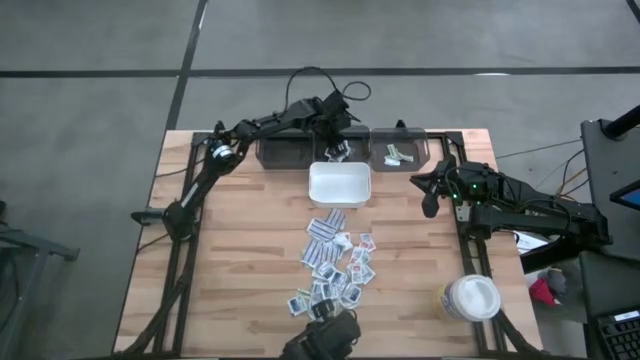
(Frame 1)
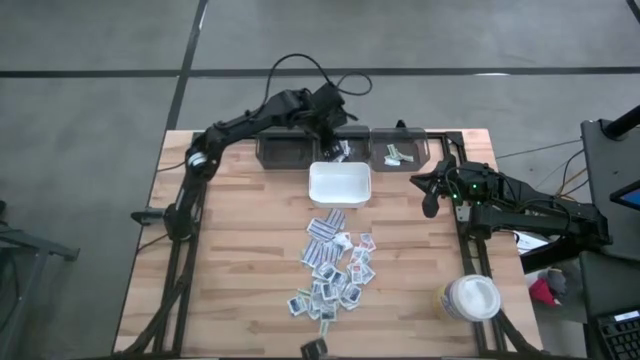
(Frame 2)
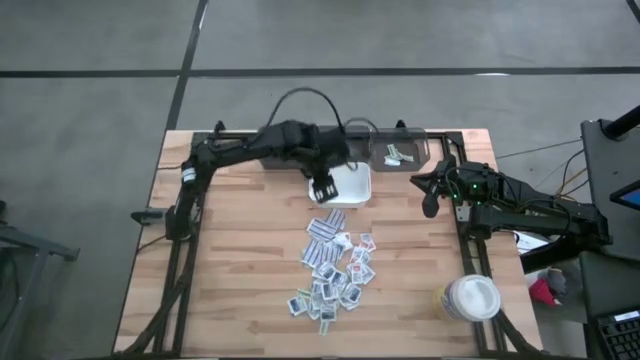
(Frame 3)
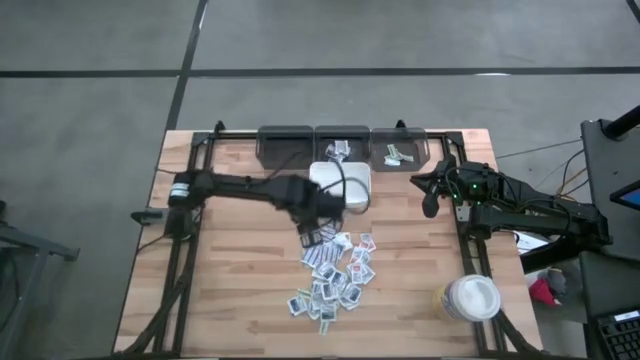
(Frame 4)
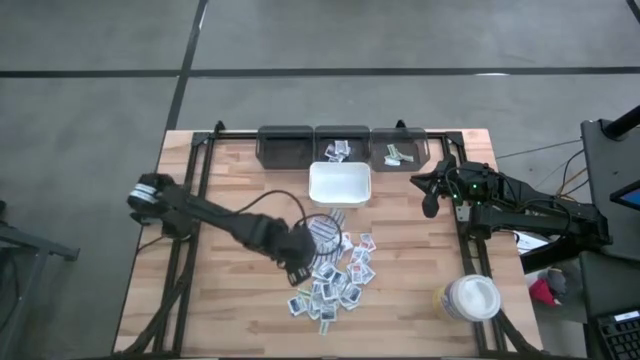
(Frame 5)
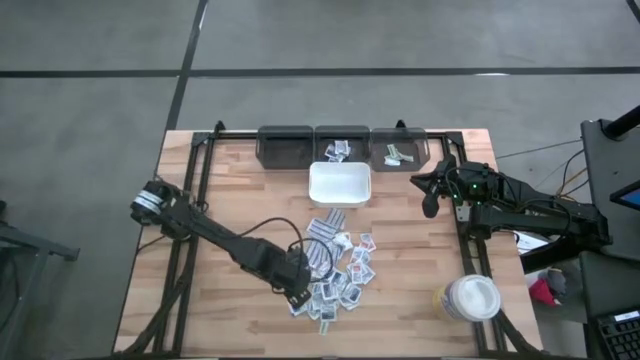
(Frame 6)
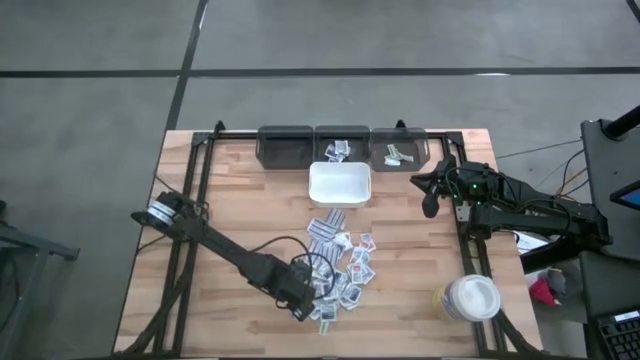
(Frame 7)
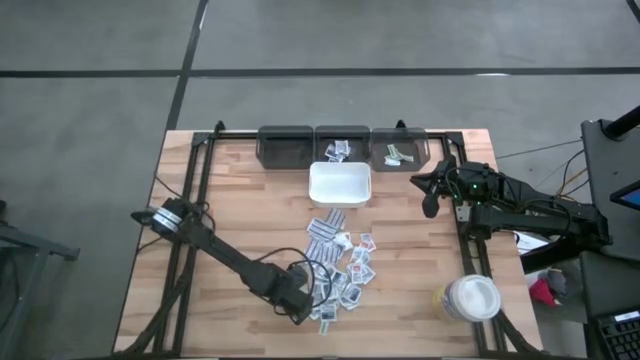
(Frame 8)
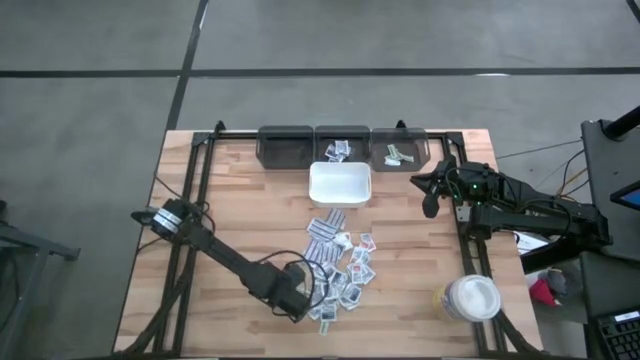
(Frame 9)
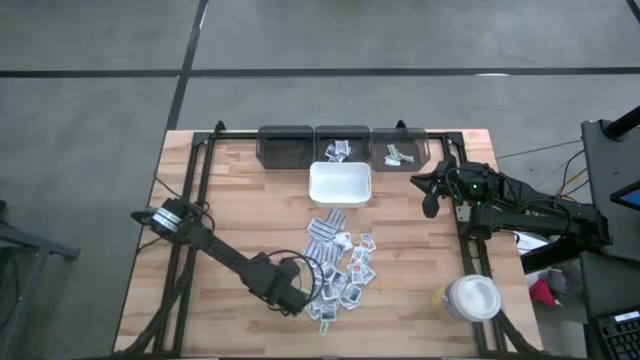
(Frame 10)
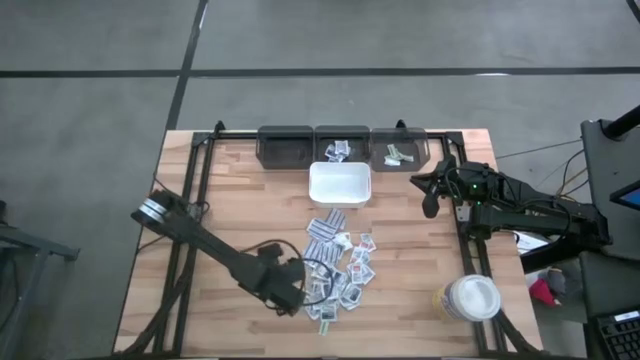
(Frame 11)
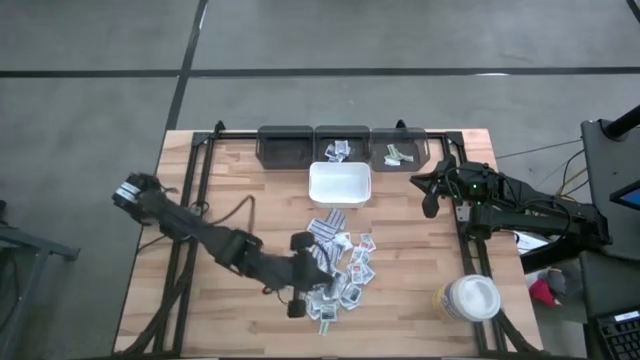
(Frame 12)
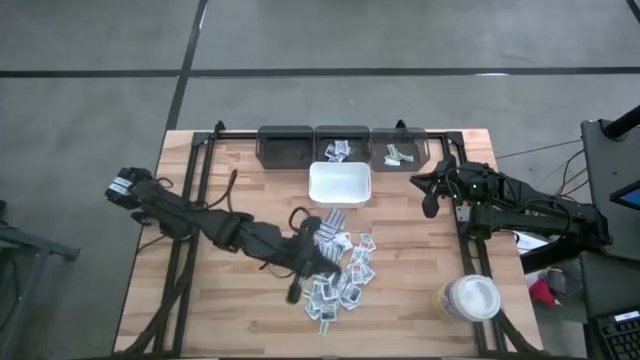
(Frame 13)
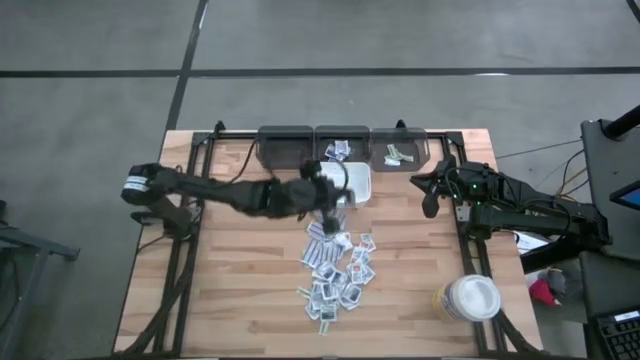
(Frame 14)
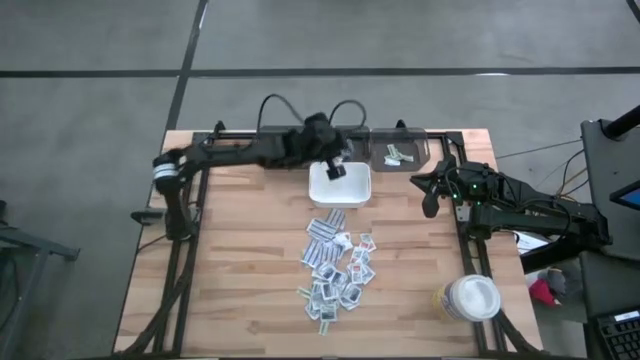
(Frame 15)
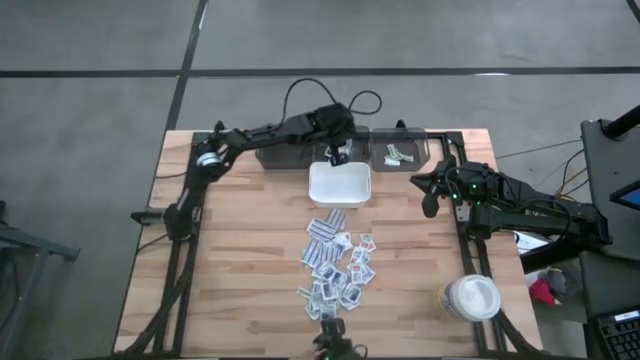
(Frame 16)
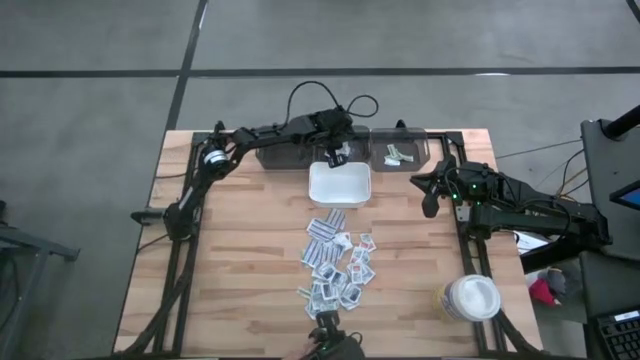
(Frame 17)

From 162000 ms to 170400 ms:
Task: Pick & Place First Aid Supplies
Put the blue alcohol pad into the middle gray bin

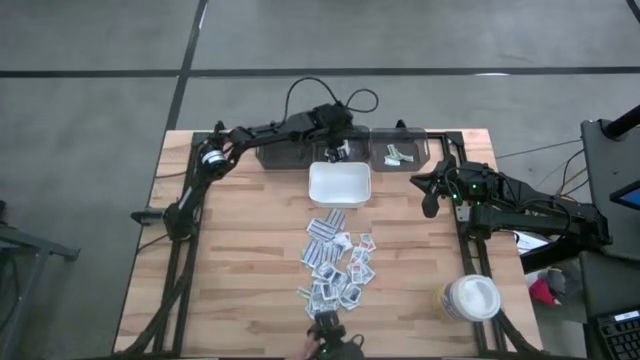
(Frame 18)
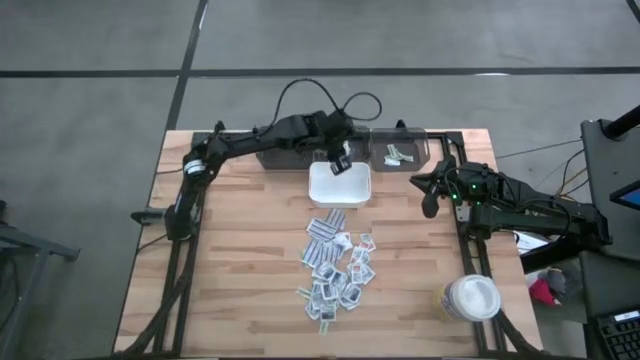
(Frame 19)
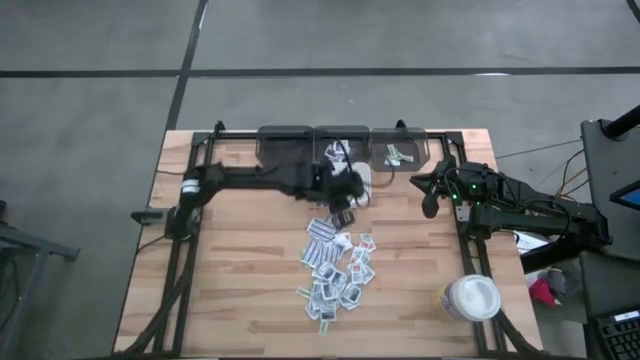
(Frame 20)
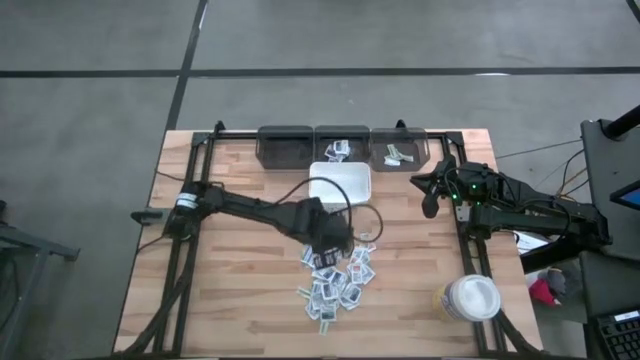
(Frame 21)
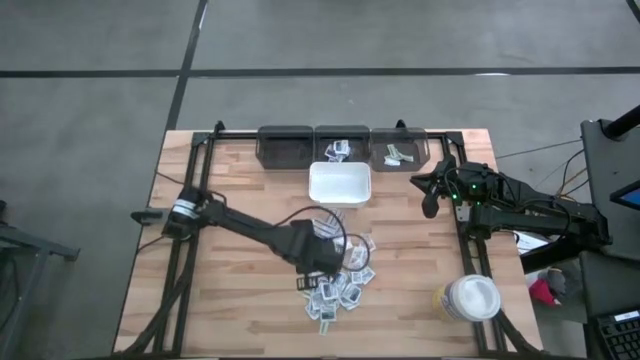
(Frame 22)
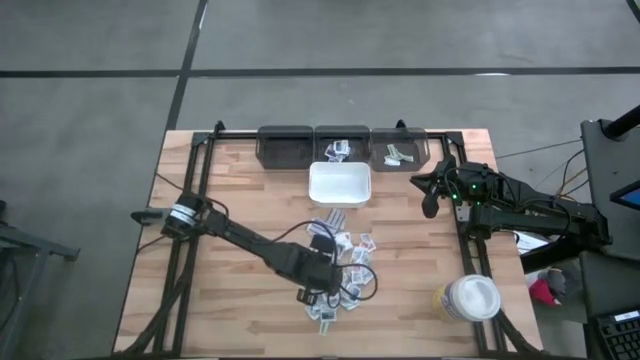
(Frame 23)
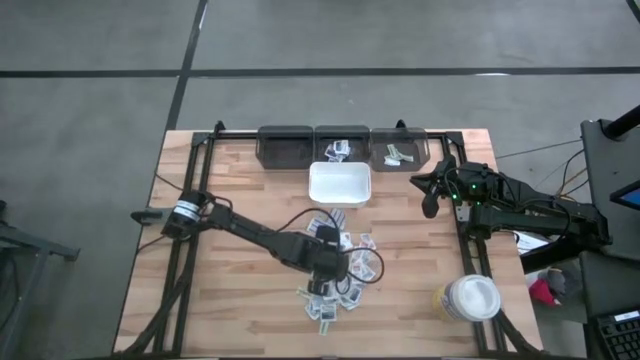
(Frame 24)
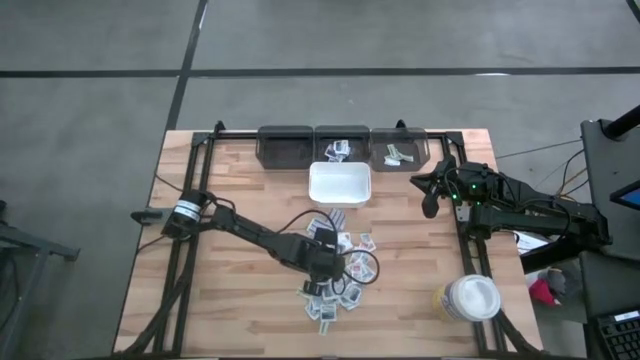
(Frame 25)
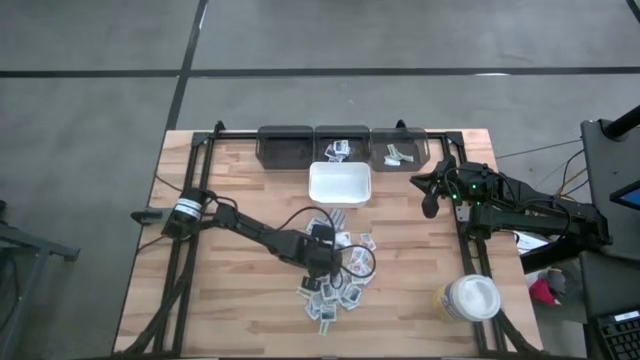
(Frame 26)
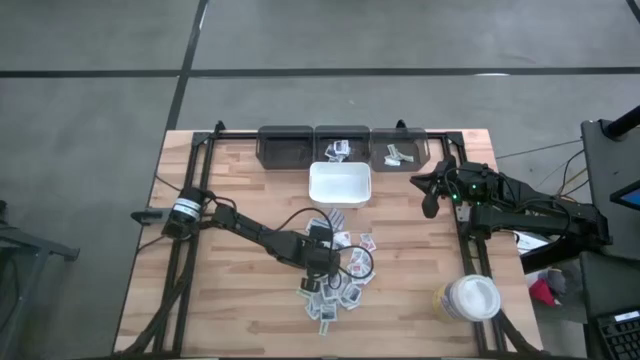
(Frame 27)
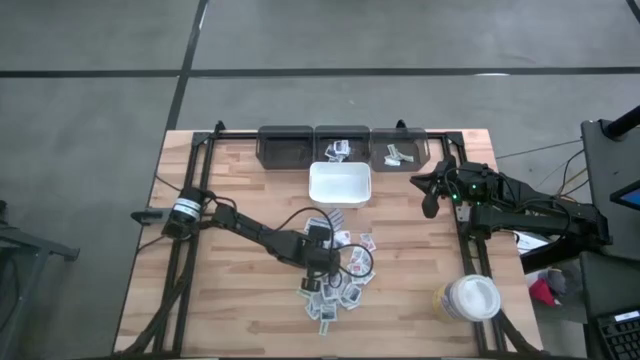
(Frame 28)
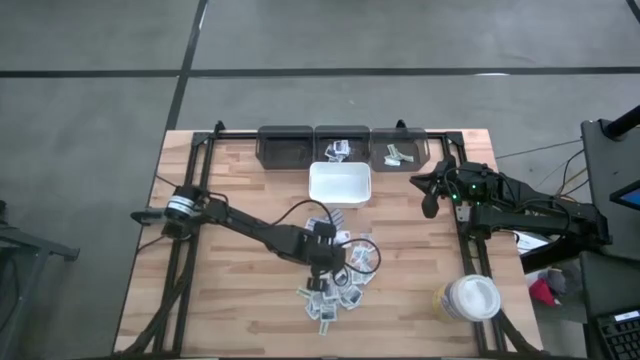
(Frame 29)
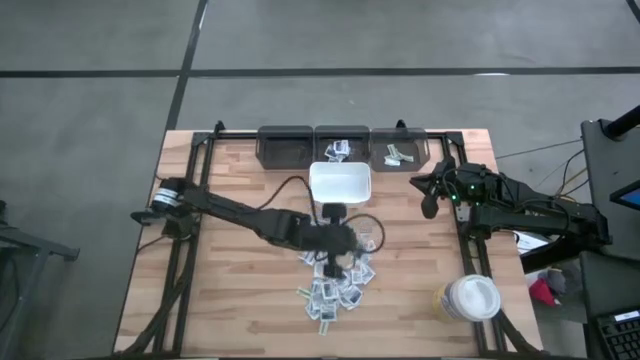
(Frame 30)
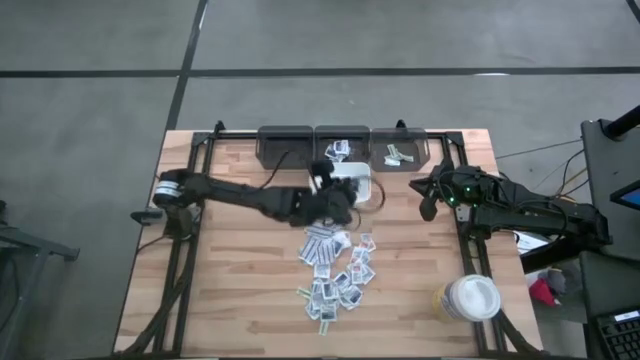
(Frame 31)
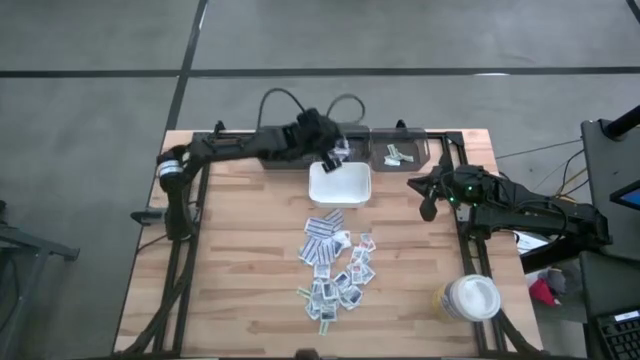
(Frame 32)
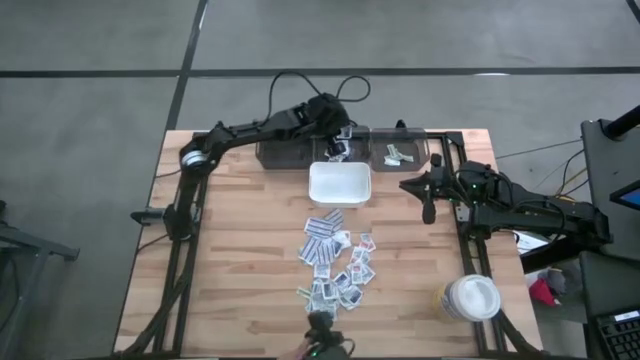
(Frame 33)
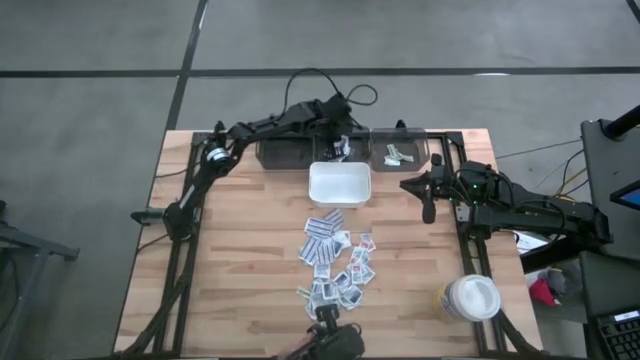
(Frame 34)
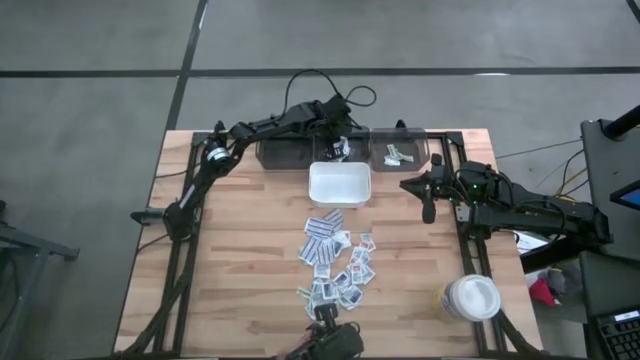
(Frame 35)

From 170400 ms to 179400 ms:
Put the blue alcohol pad into the middle gray bin

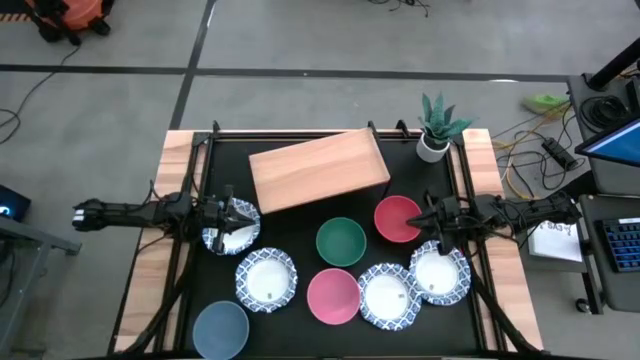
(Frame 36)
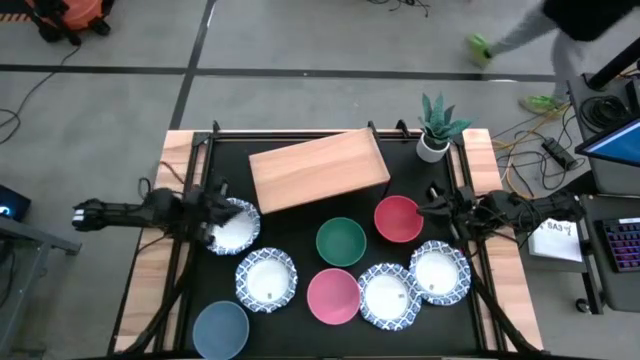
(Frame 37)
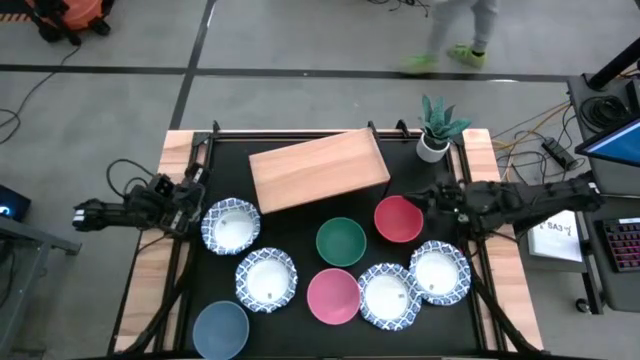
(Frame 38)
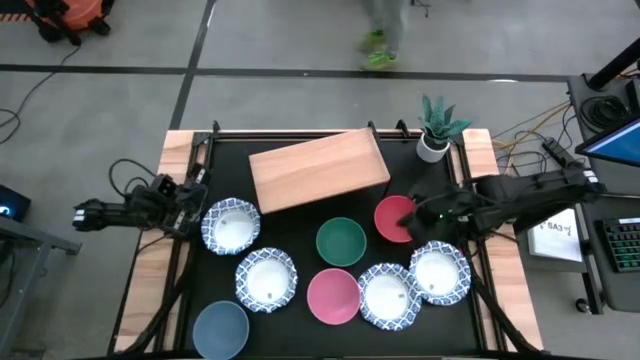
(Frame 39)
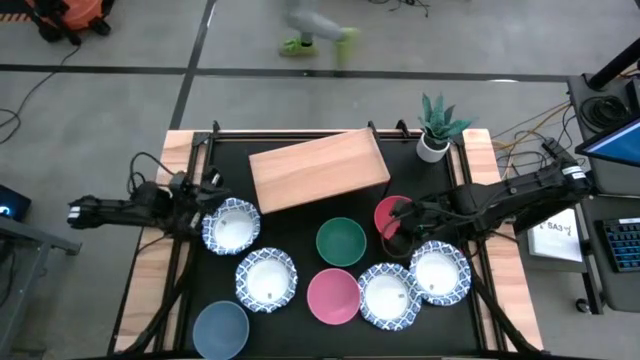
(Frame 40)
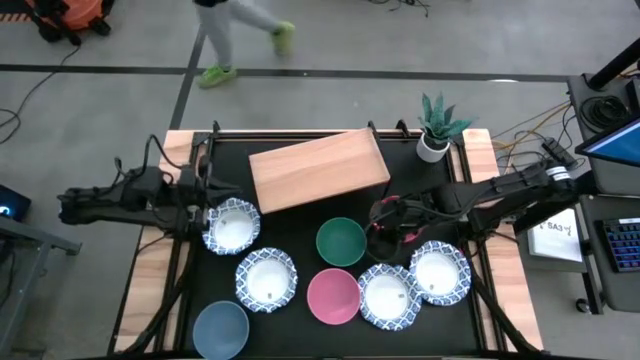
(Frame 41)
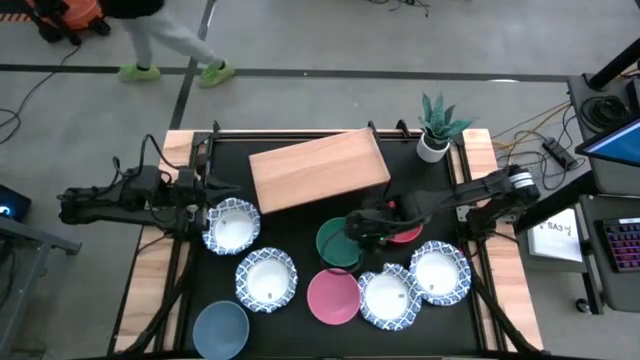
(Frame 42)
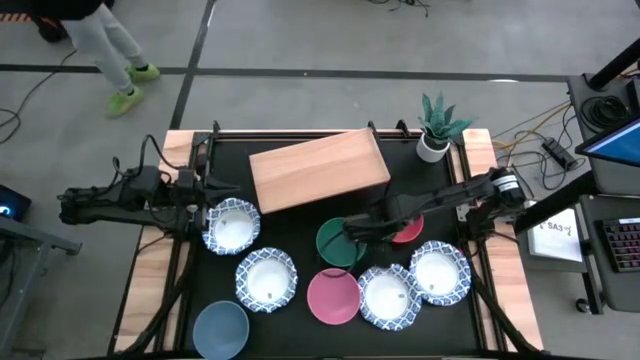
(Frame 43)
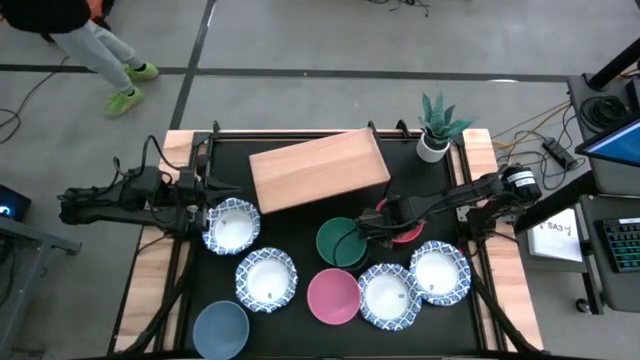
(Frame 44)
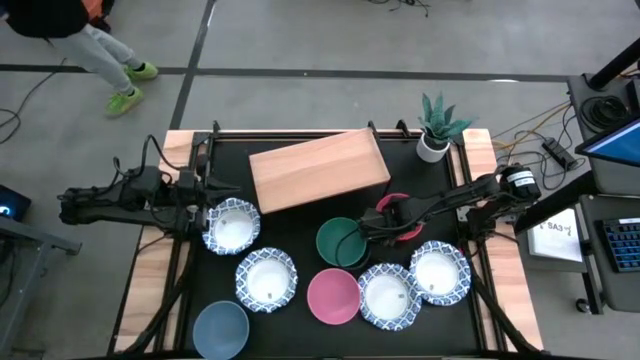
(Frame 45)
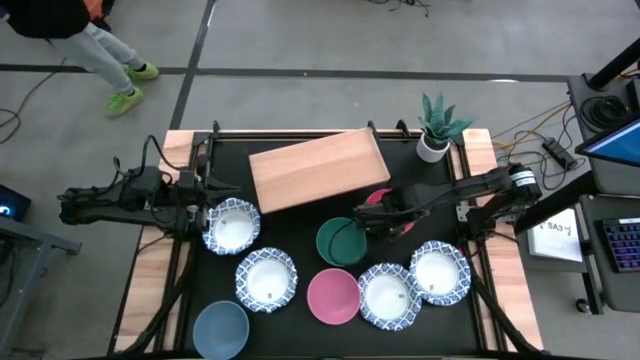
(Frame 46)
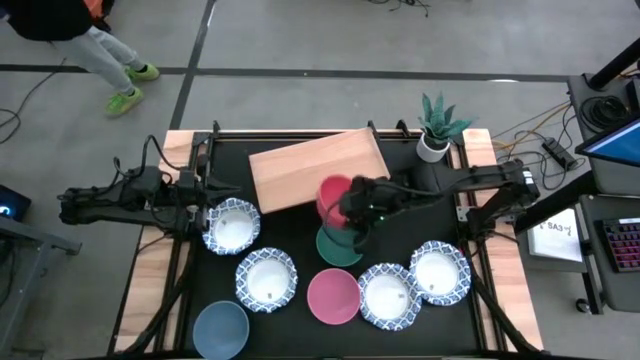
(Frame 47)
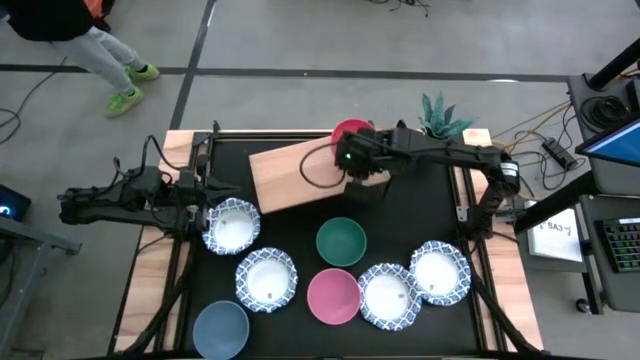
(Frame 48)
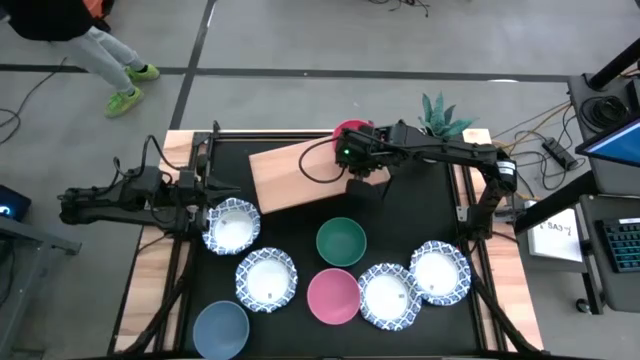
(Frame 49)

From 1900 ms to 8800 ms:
Task: Place and stack bowls onto a shelf
Put the orange bowl on the shelf
